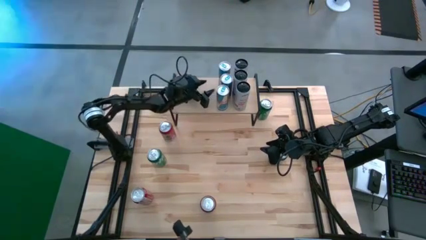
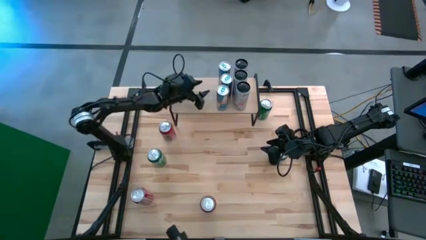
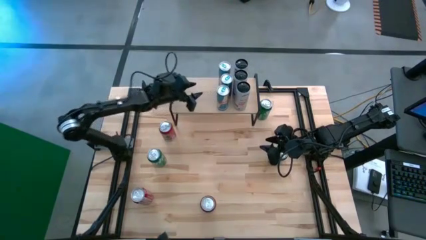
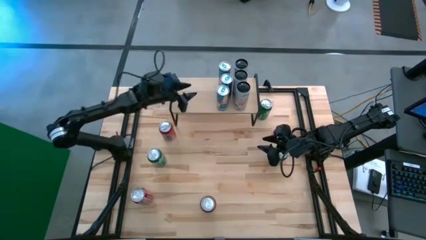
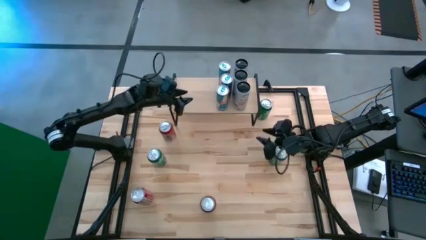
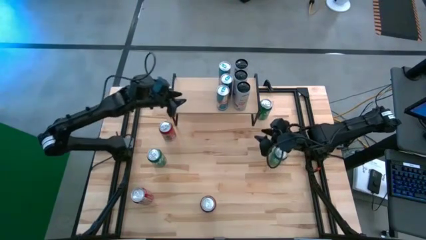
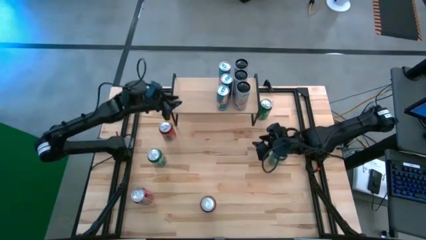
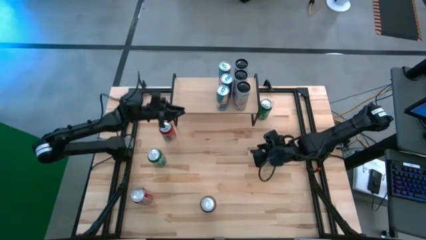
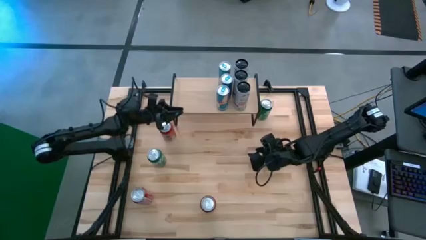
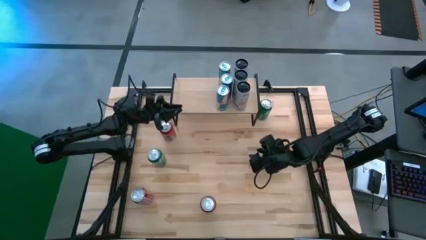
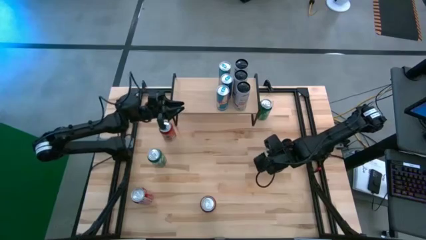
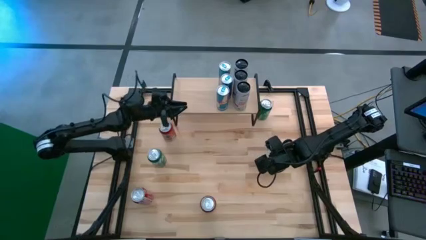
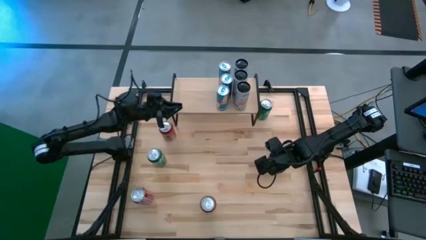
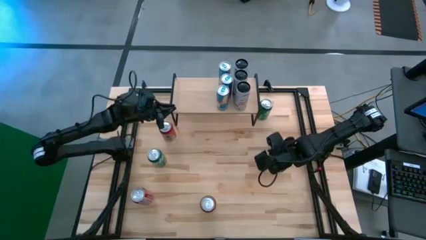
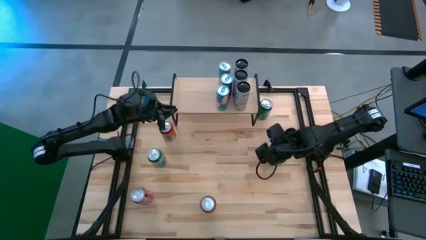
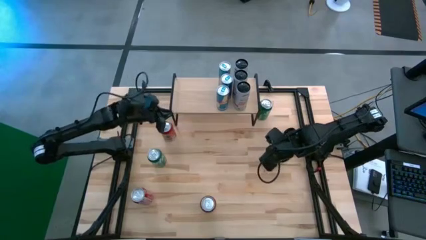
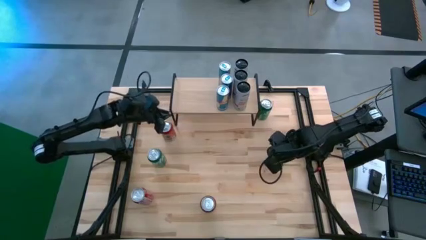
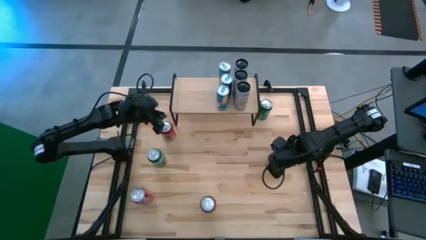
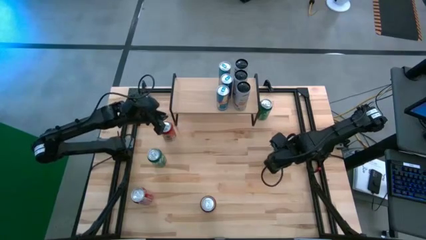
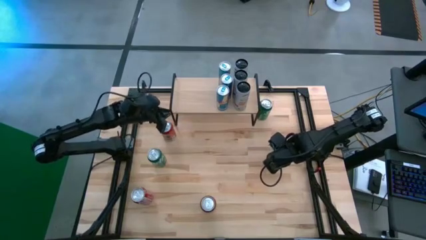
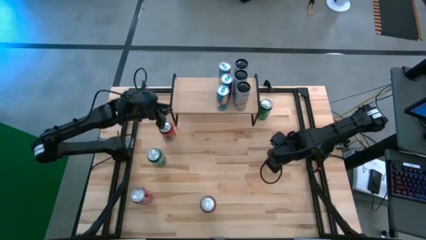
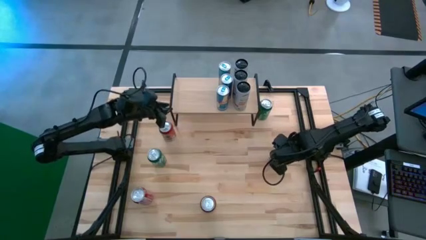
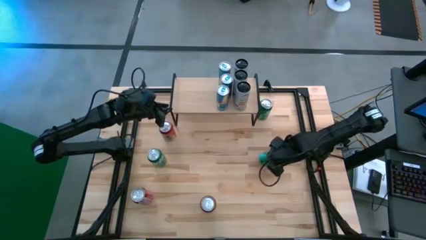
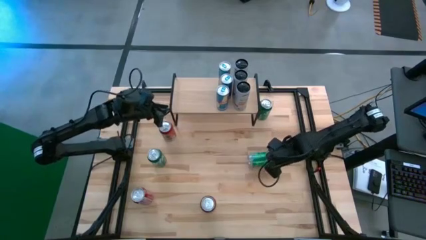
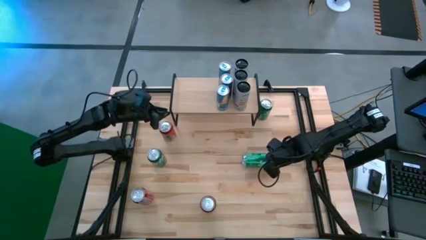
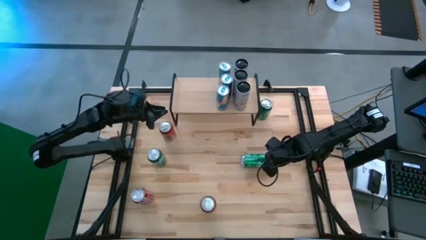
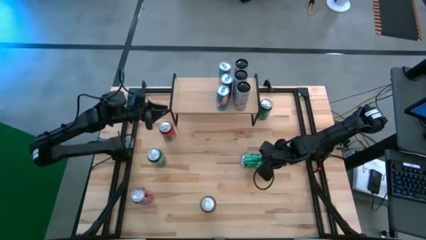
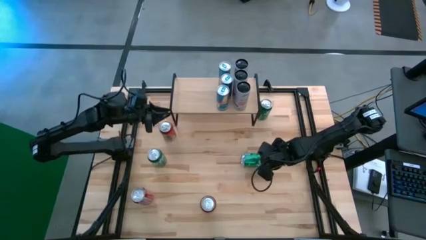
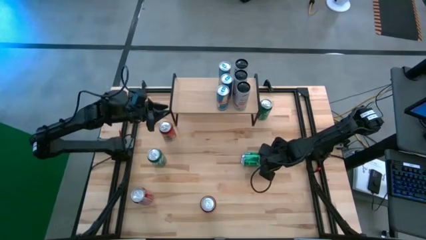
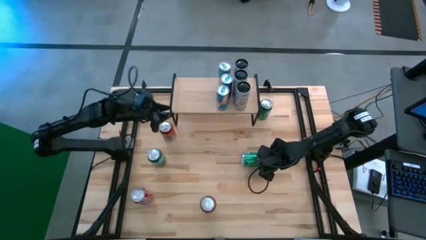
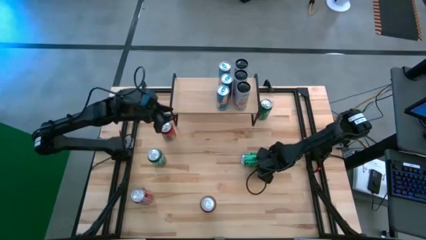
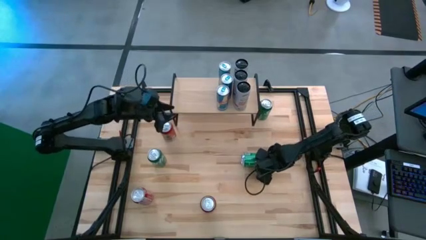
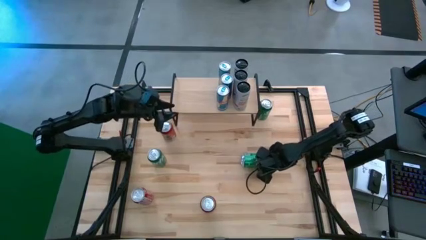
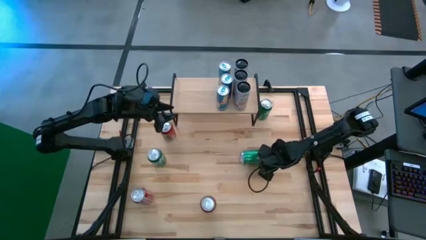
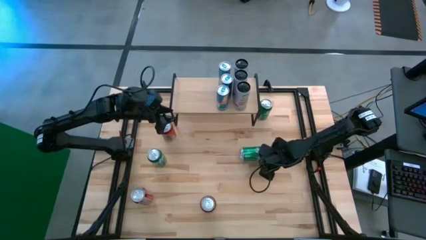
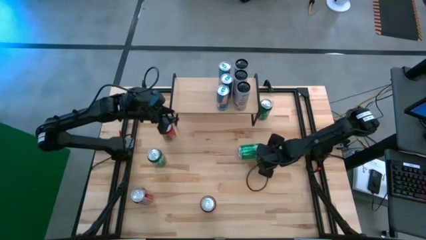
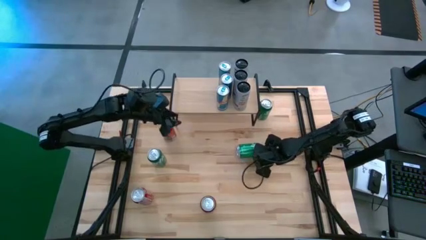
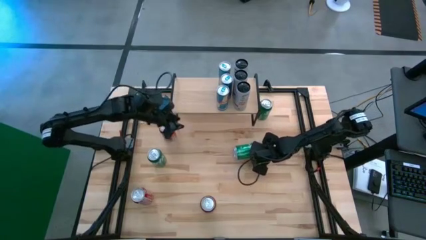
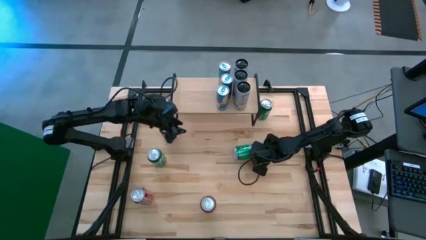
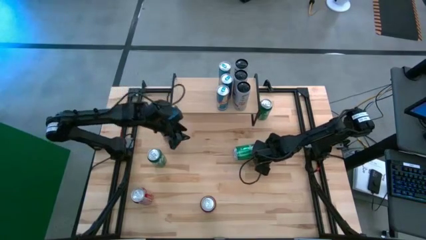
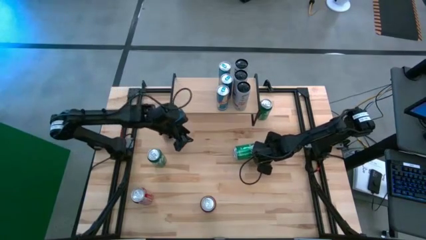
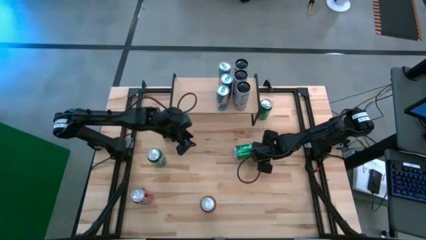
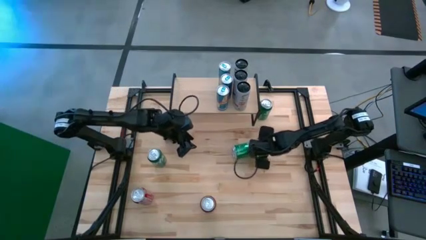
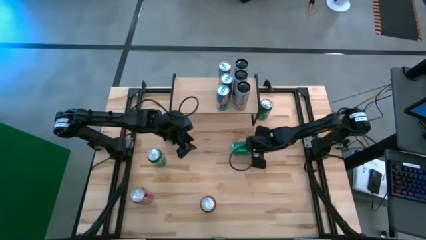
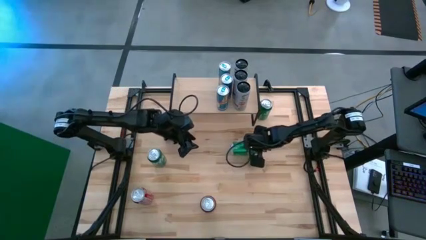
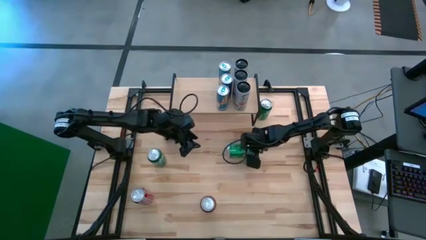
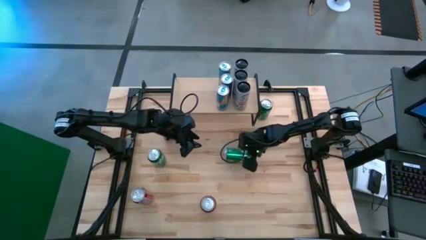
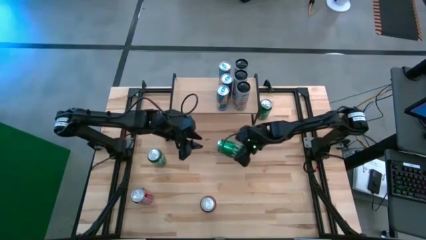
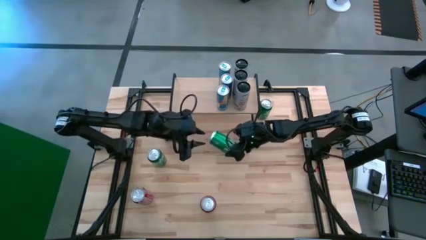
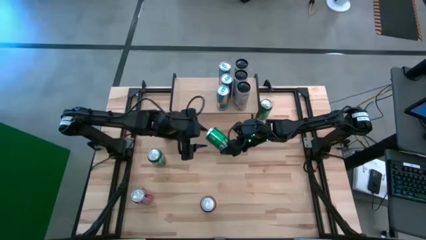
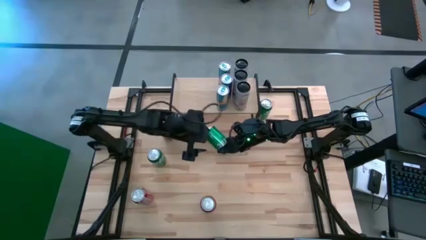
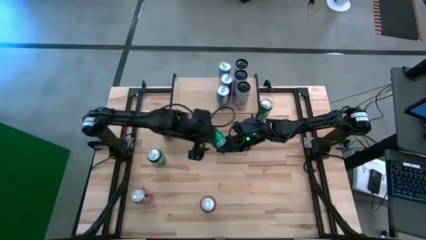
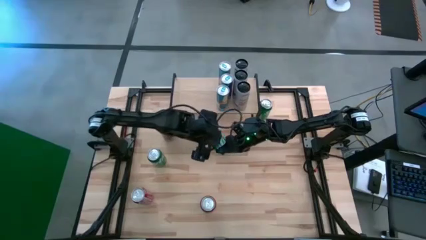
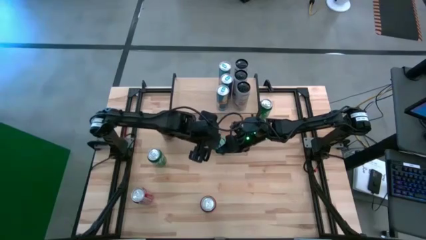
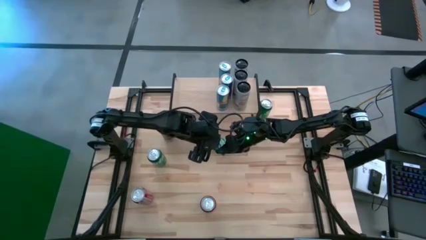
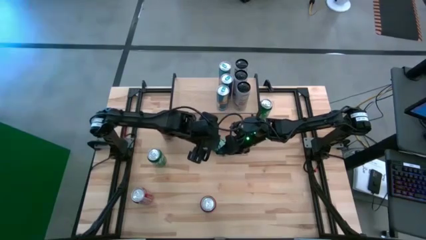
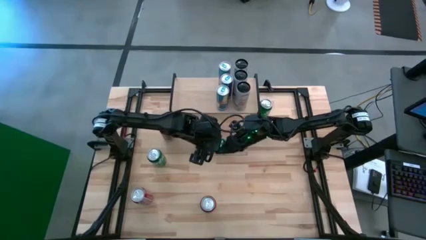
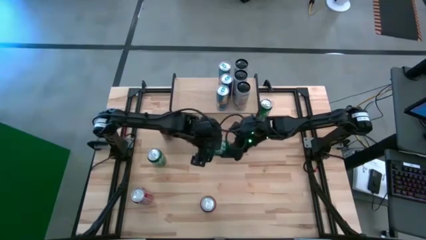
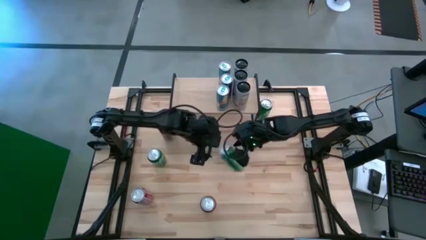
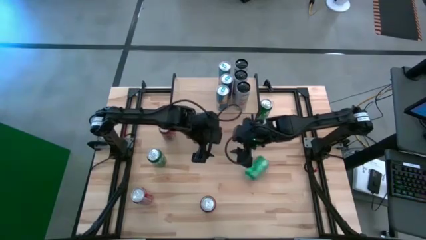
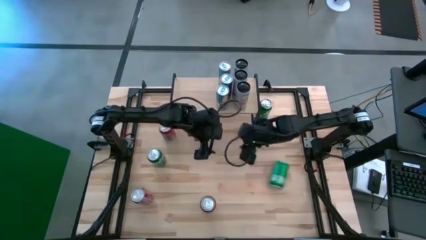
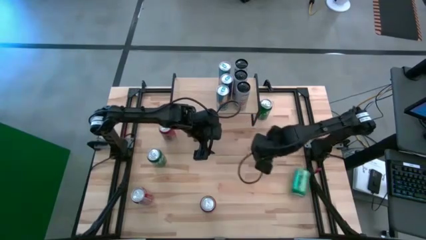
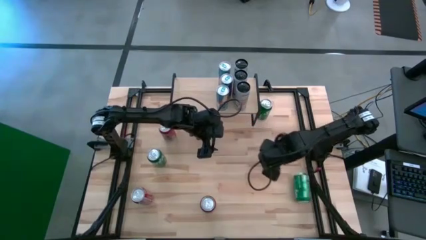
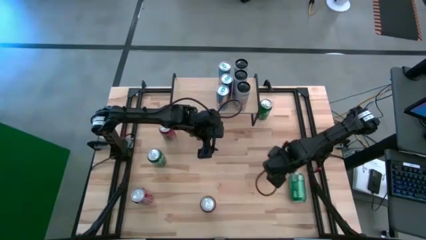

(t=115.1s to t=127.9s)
Task: Place canned beverage on shelf
Put the bottom right green soda can on the shelf

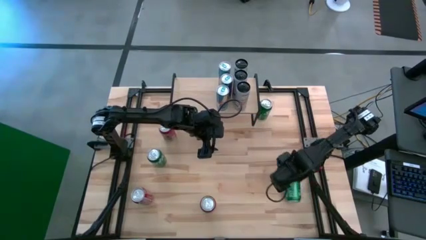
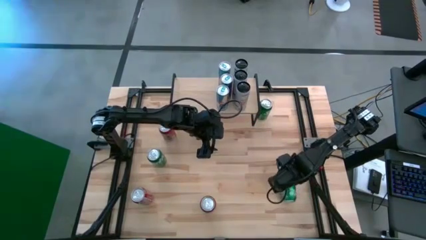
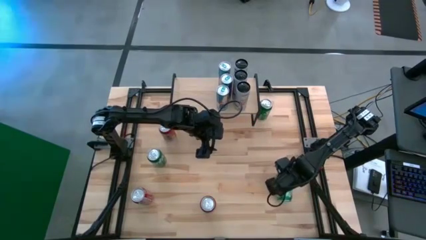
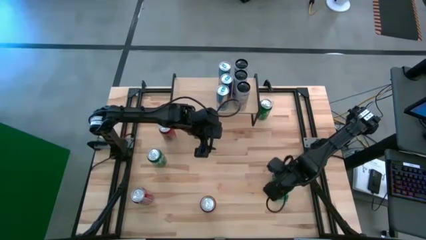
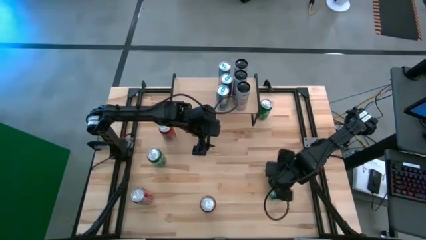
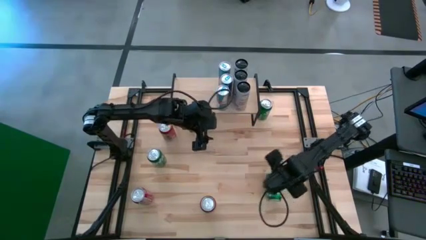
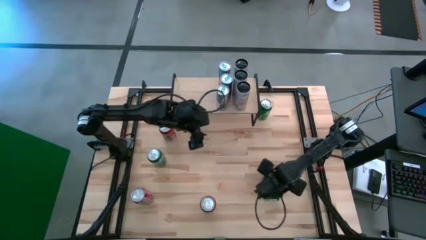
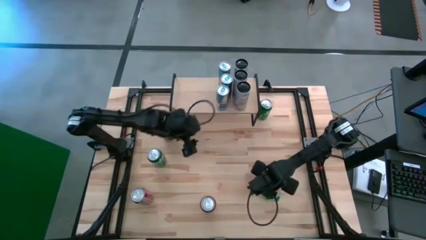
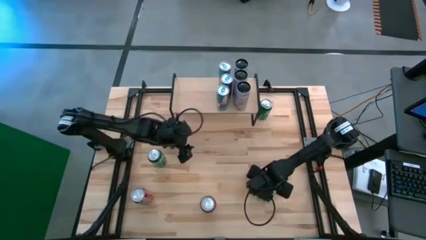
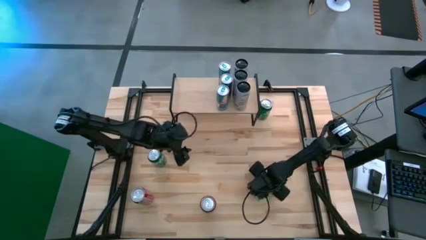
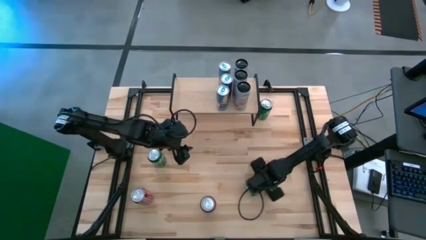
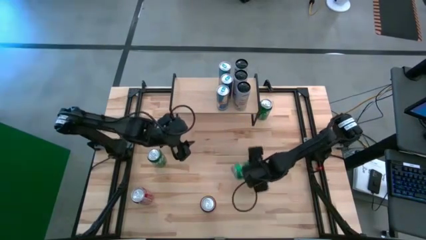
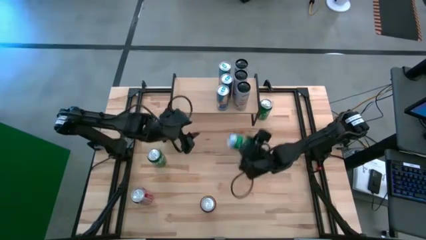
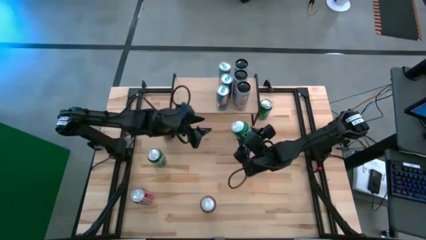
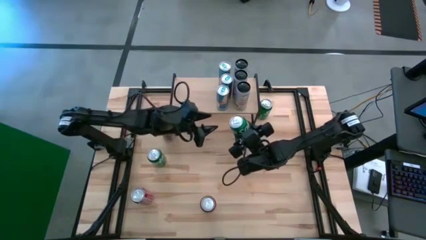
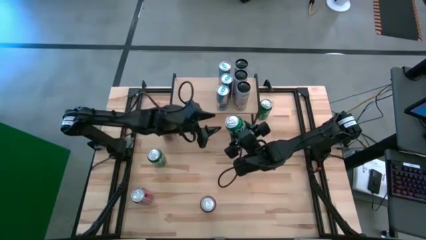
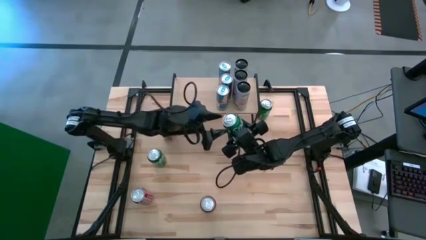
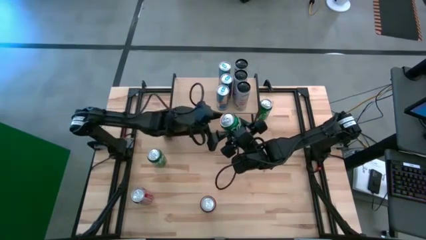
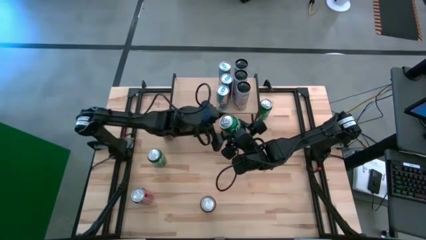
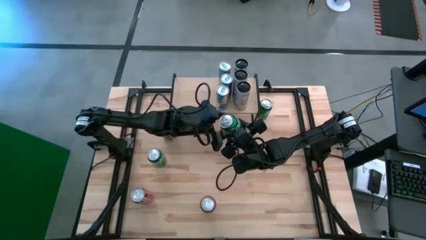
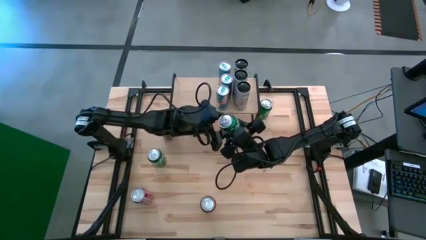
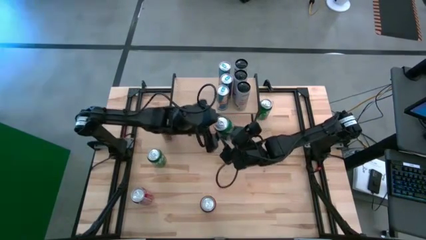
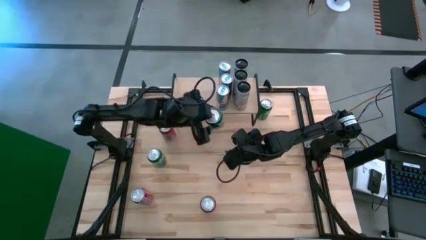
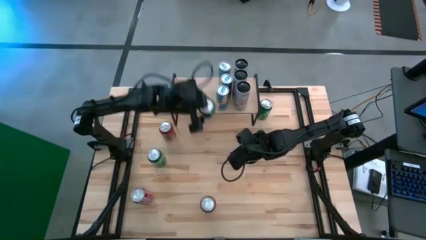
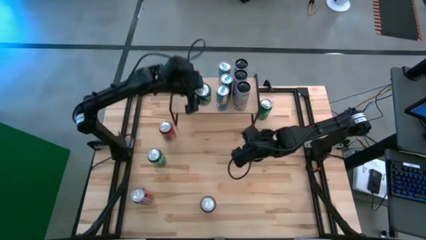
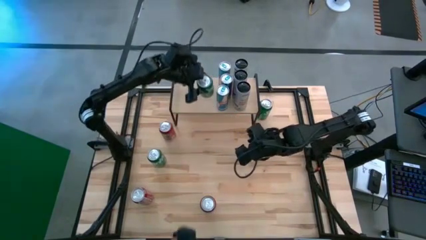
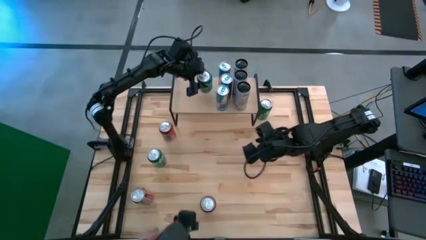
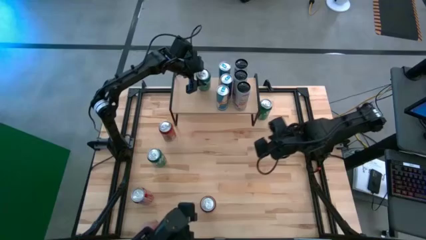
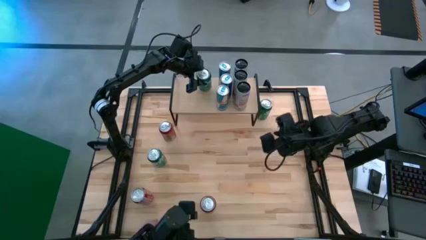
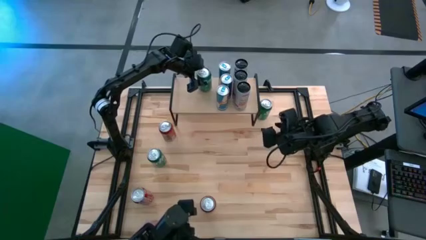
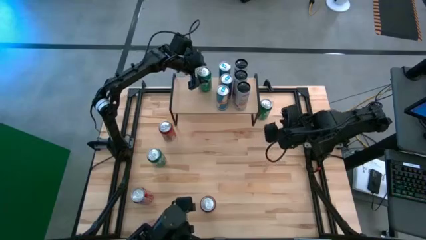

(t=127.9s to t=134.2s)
Put the bottom right green soda can on the shelf
